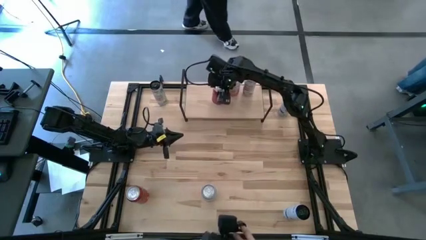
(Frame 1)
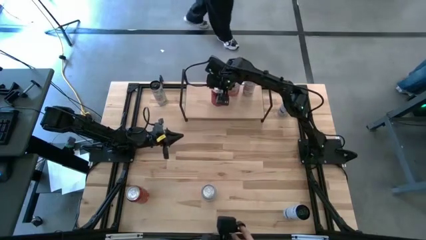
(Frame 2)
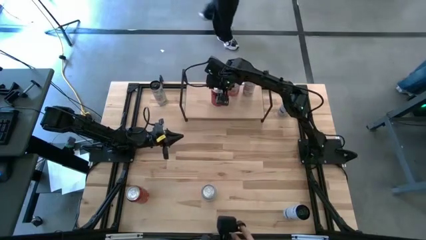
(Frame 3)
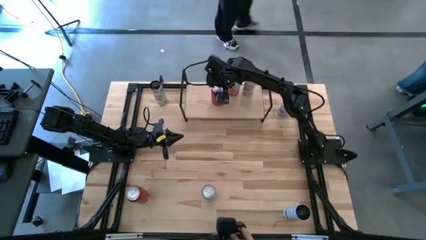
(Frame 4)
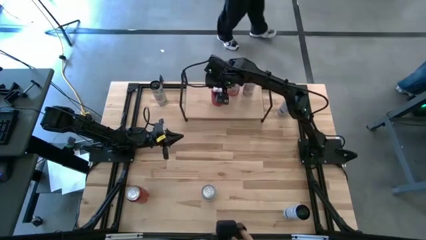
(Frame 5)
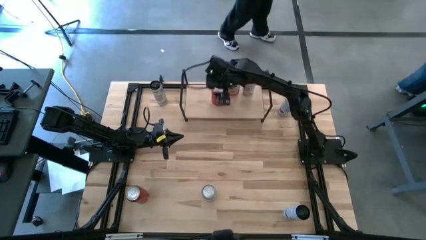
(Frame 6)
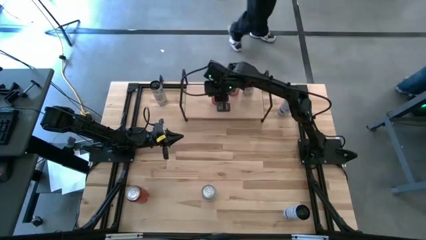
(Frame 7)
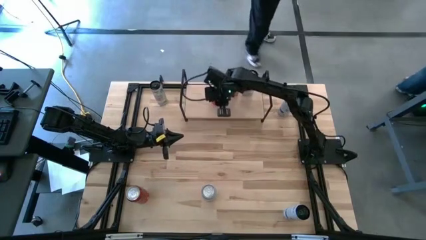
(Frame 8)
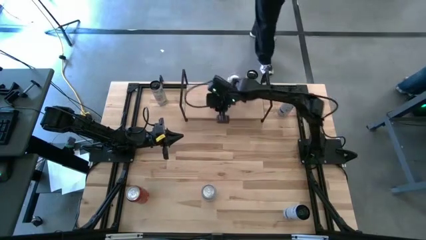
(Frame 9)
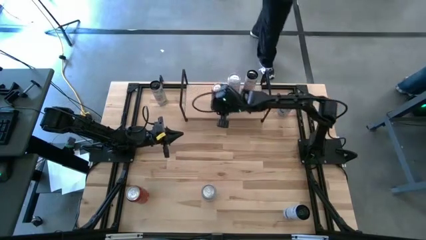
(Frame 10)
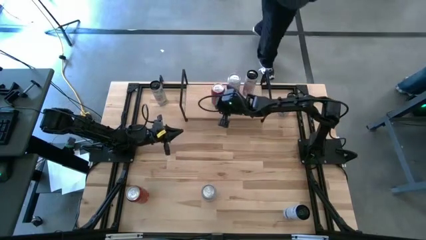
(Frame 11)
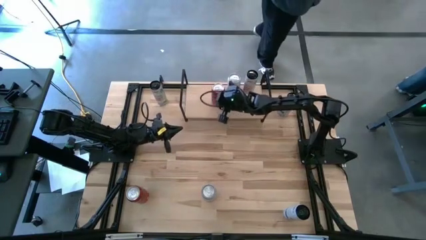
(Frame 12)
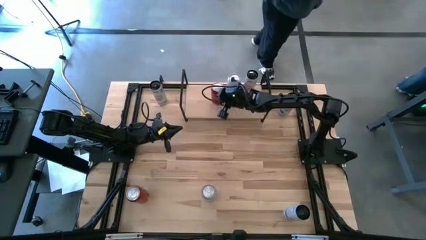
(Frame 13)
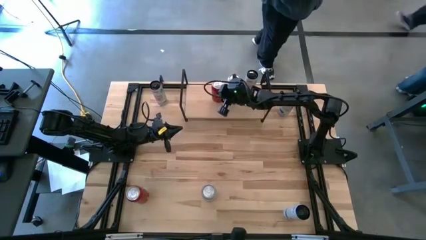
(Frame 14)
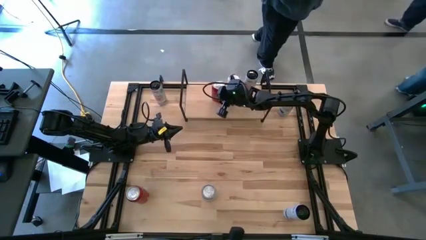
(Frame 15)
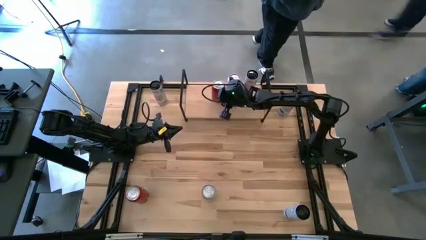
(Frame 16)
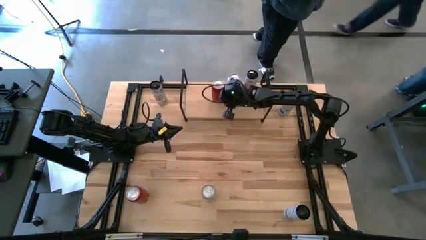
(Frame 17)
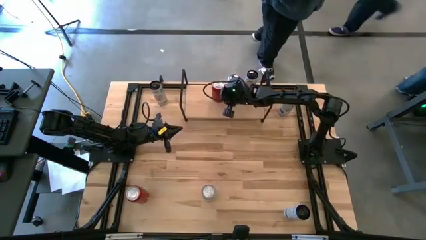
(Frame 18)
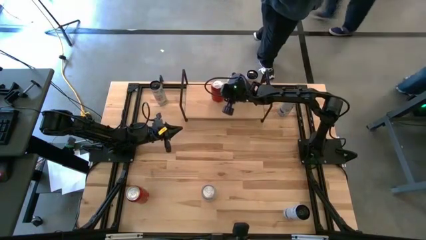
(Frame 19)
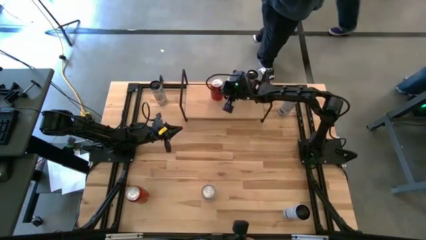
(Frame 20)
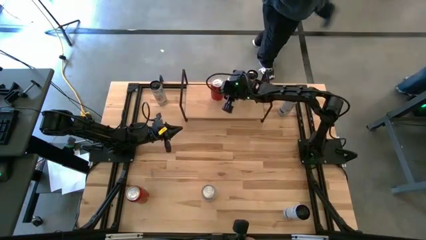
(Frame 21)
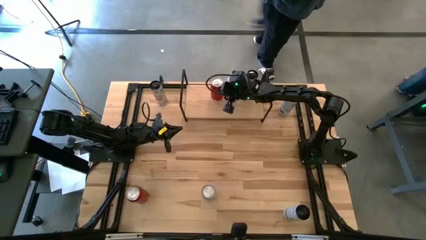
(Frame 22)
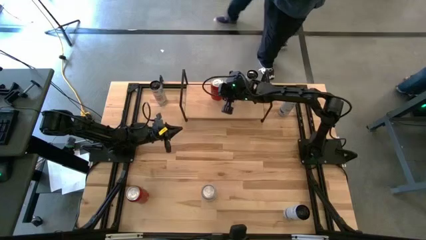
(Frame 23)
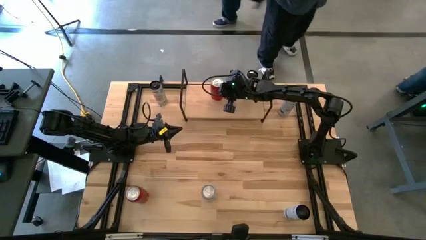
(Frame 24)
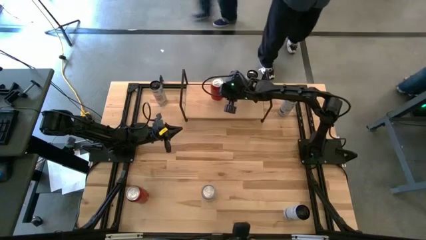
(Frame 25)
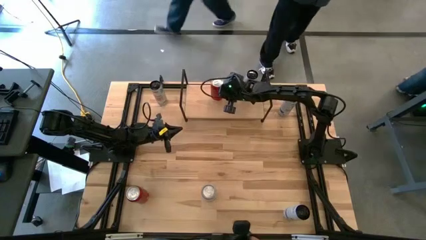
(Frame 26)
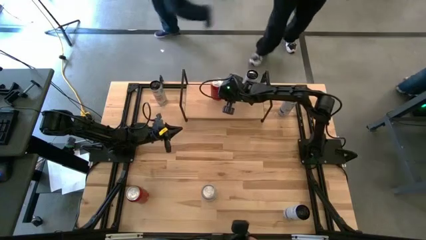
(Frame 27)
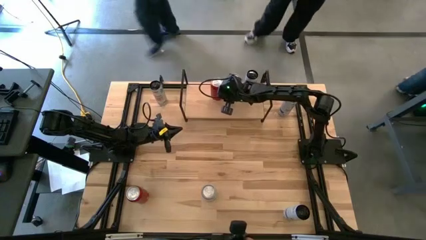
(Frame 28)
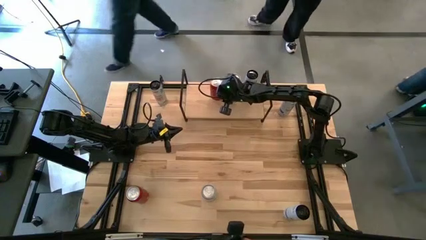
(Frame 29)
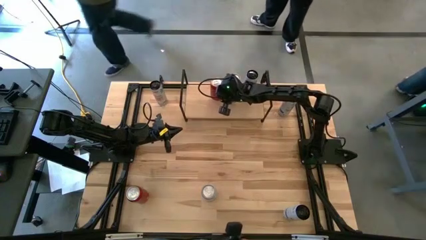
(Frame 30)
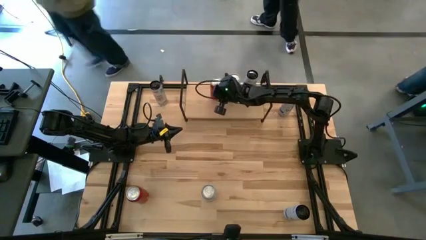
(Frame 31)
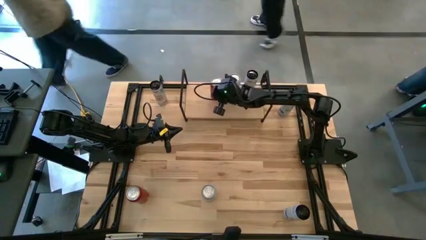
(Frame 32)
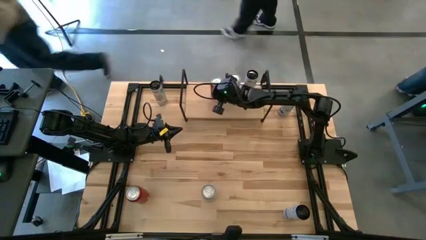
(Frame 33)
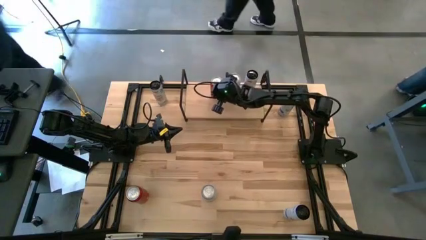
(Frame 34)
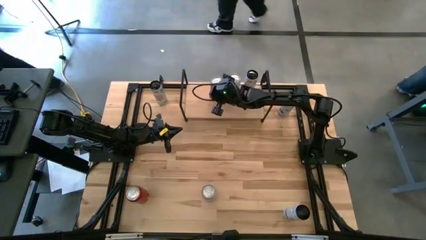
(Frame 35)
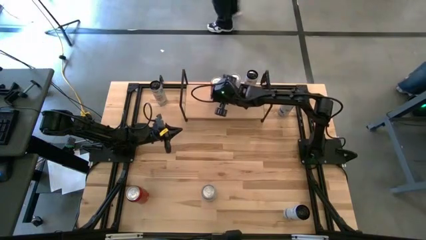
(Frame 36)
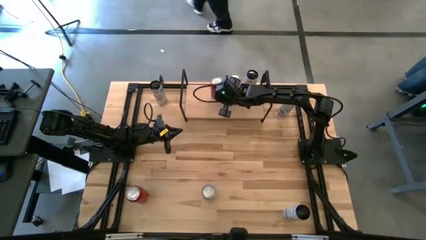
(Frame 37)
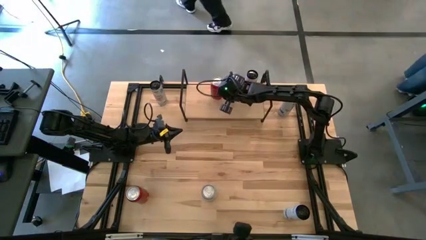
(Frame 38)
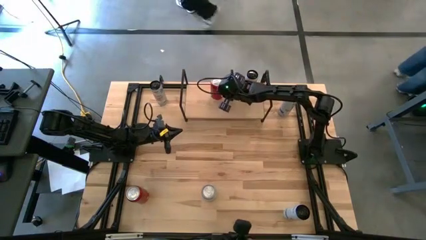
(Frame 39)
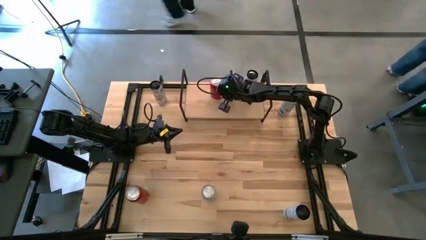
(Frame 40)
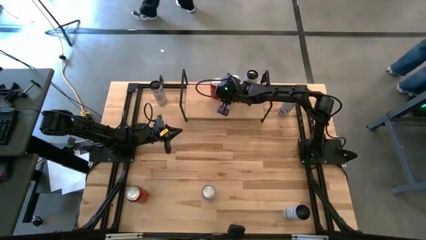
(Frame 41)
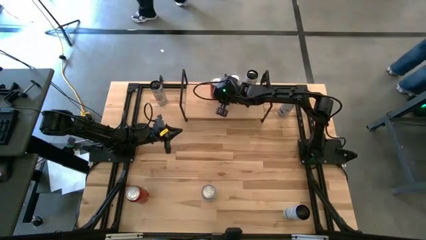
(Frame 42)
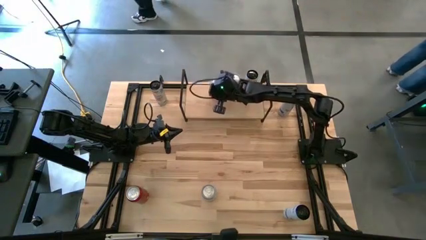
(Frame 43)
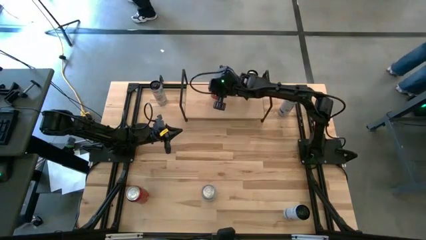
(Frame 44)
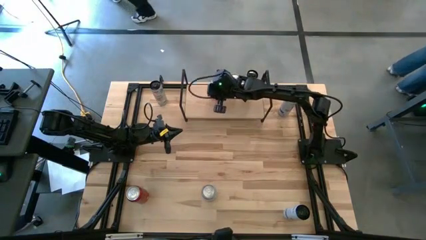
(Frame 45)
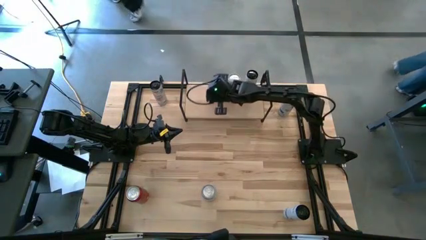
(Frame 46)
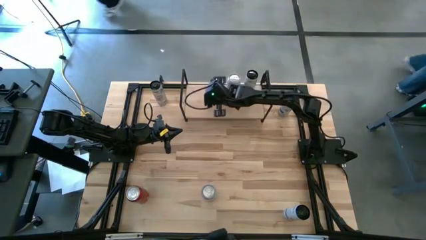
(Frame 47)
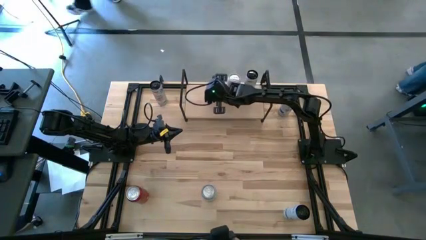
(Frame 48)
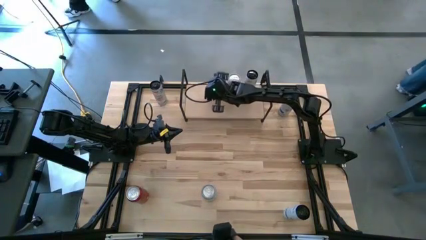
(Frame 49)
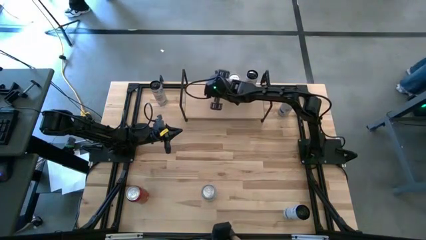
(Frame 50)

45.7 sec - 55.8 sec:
Task: Place canned beverage on shelf
Put the right red soda can on the shelf

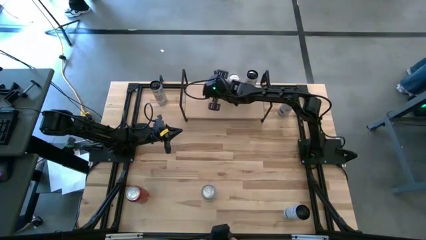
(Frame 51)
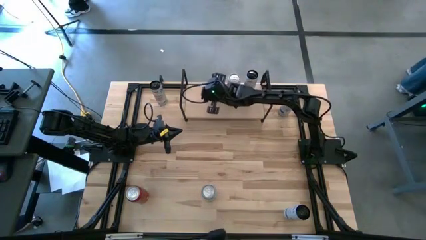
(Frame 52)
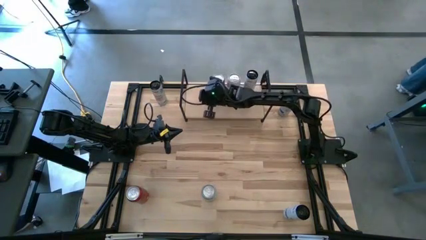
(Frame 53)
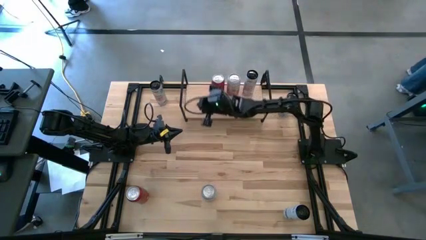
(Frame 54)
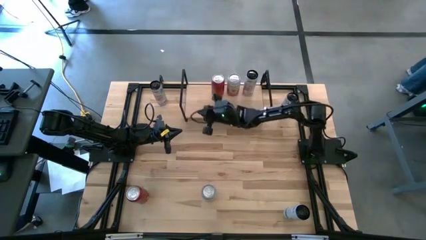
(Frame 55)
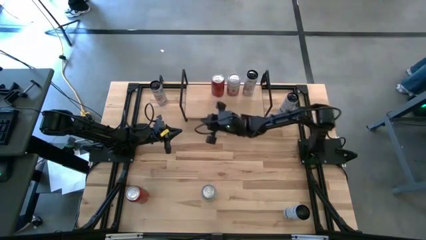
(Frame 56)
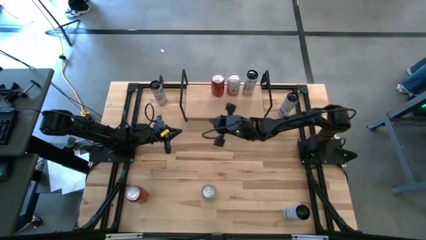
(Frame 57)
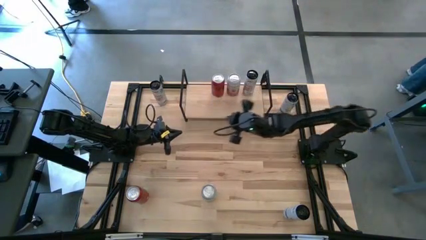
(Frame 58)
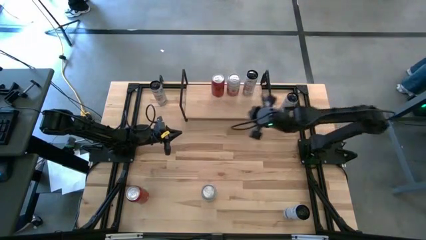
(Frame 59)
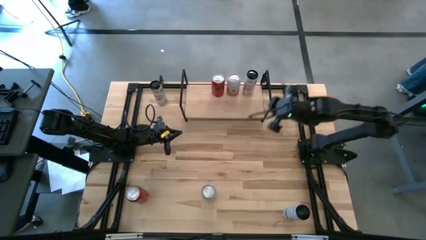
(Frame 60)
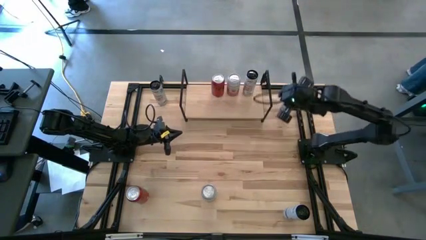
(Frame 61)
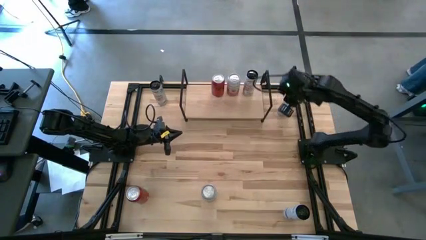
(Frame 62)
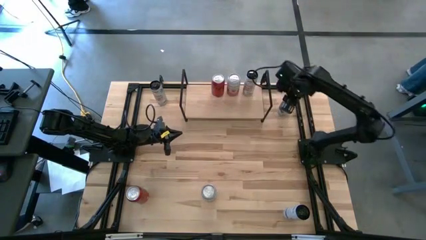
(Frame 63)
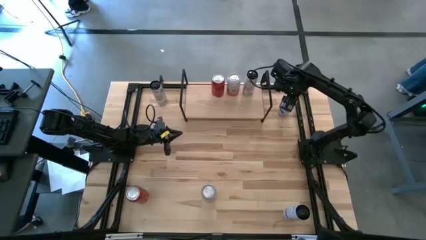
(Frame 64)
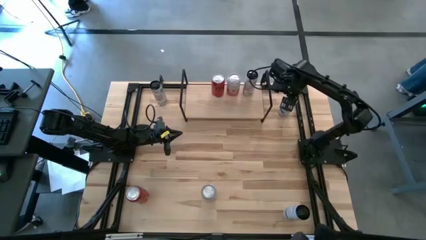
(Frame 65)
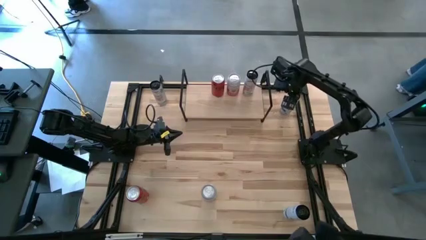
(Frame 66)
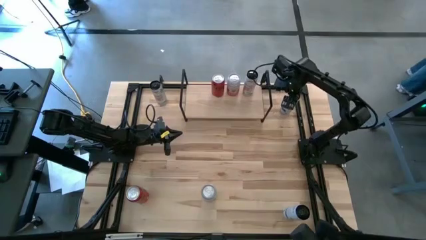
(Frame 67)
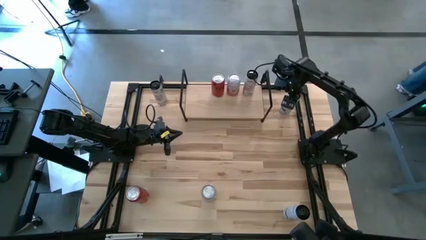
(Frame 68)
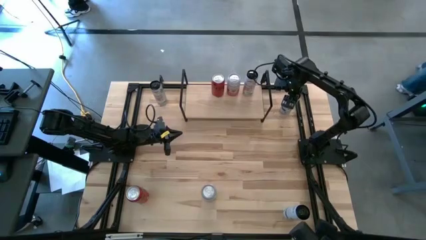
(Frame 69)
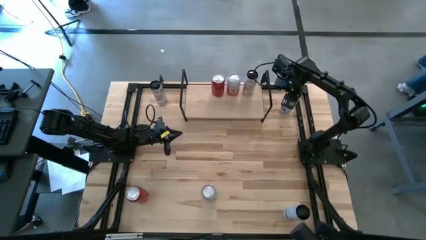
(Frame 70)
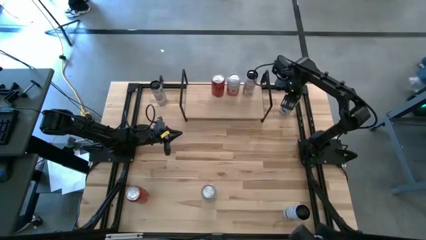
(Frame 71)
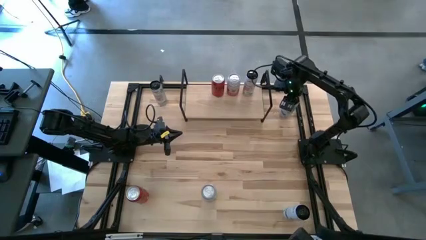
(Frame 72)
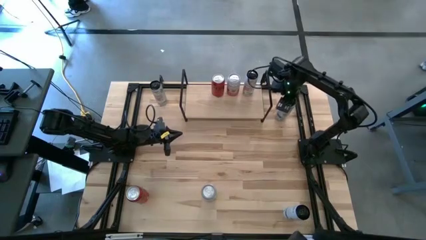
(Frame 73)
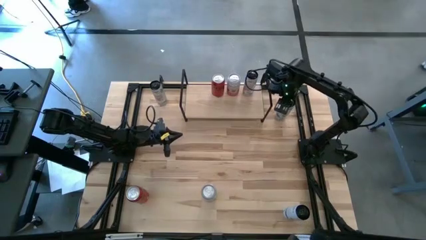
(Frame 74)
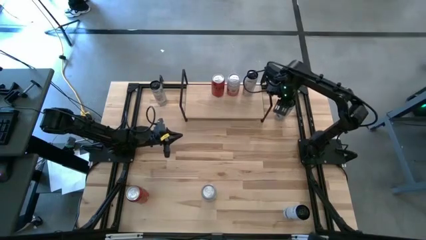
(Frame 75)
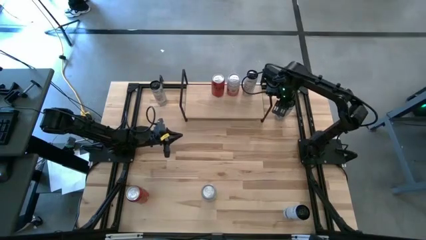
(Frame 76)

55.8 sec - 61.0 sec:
Put the right white and blue soda can on the shelf
